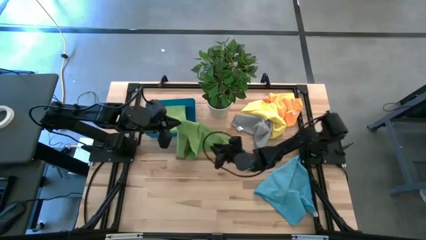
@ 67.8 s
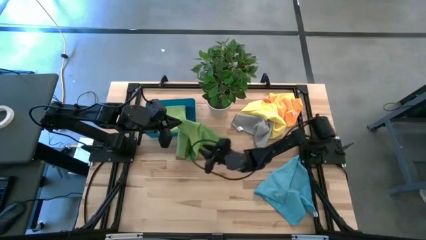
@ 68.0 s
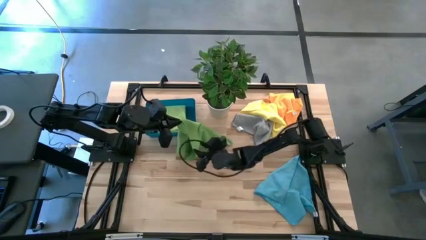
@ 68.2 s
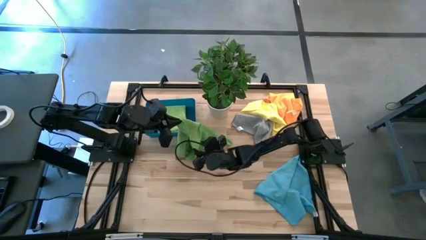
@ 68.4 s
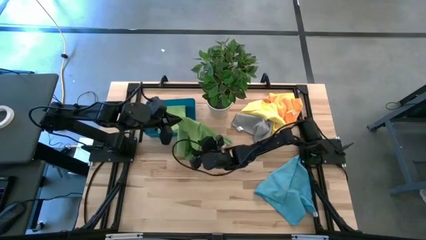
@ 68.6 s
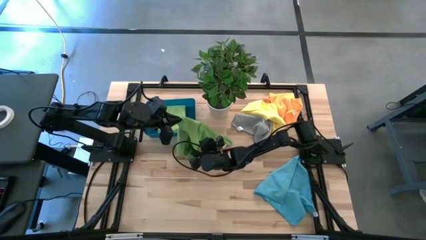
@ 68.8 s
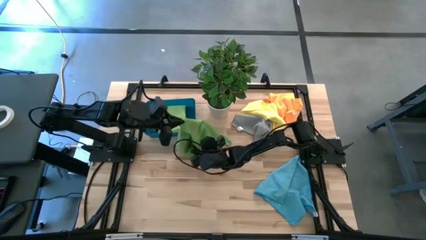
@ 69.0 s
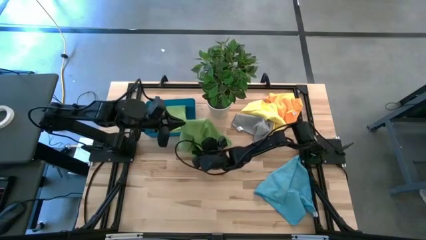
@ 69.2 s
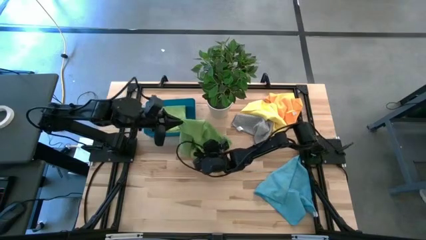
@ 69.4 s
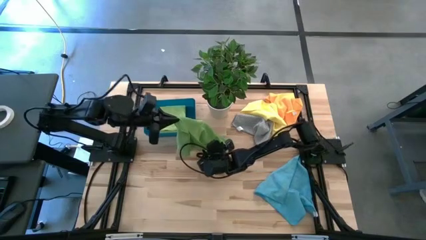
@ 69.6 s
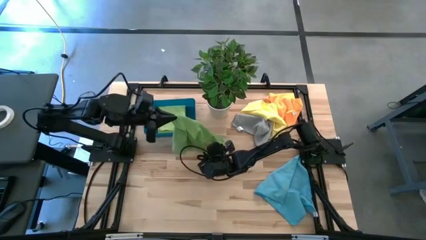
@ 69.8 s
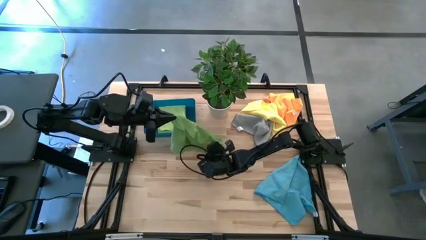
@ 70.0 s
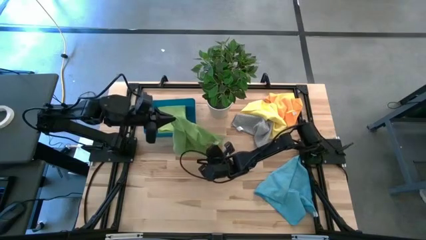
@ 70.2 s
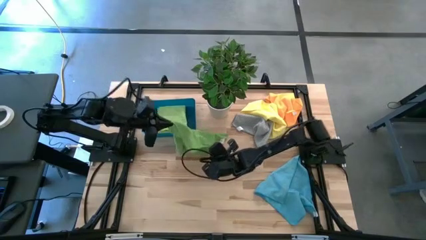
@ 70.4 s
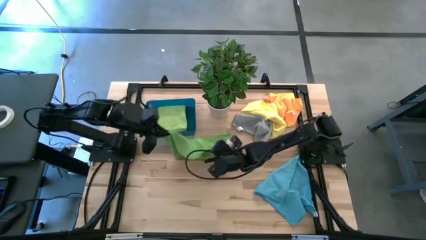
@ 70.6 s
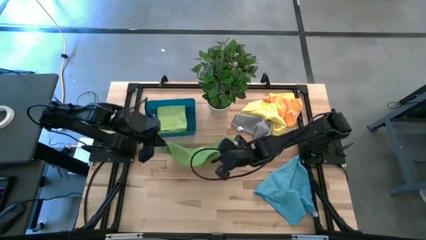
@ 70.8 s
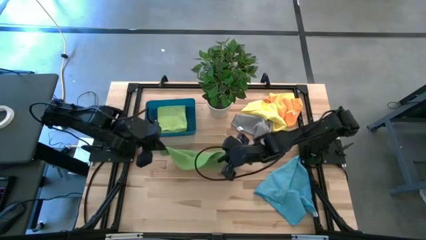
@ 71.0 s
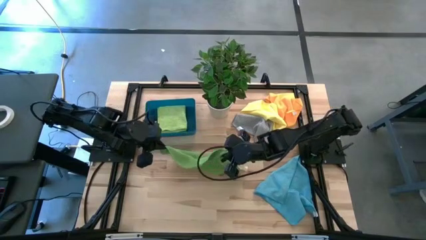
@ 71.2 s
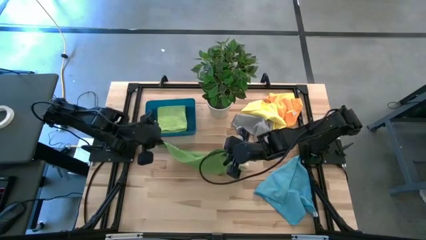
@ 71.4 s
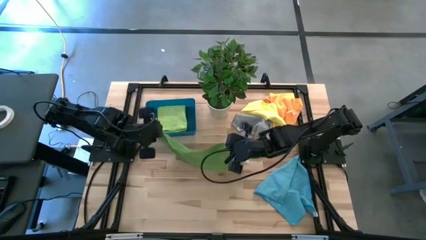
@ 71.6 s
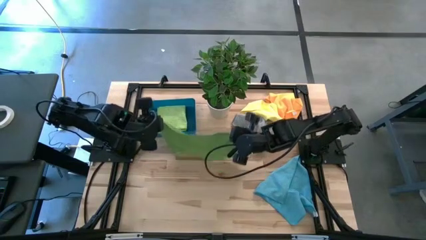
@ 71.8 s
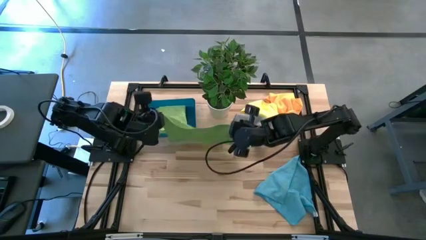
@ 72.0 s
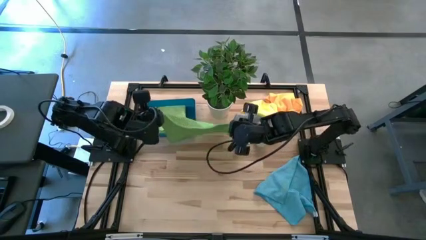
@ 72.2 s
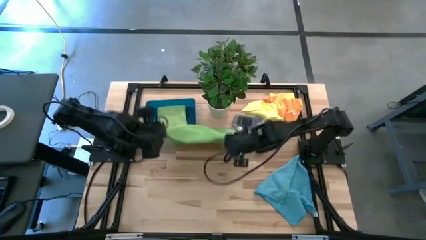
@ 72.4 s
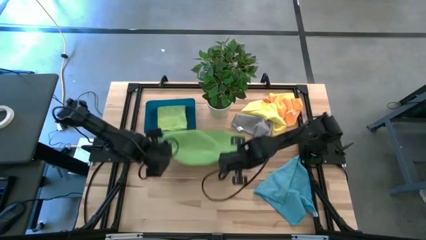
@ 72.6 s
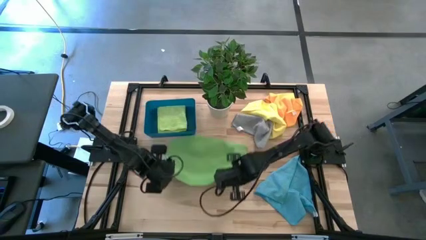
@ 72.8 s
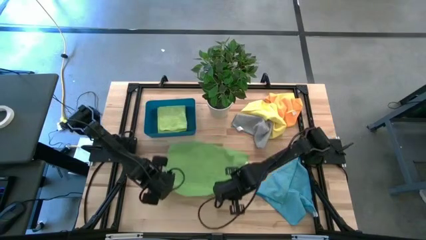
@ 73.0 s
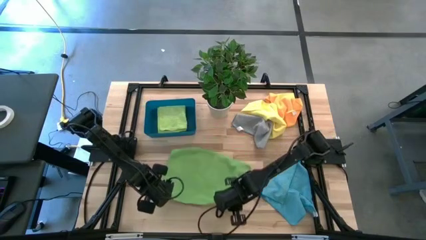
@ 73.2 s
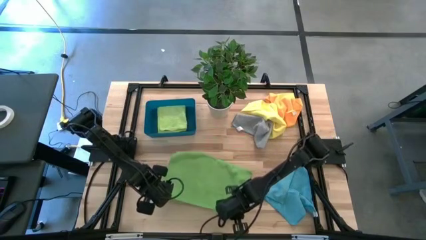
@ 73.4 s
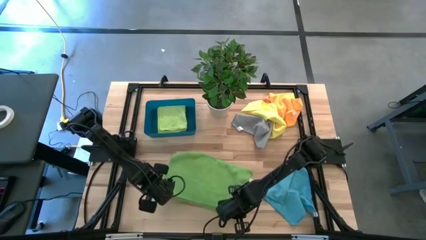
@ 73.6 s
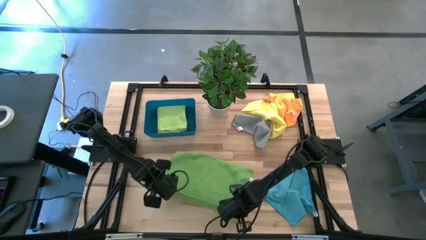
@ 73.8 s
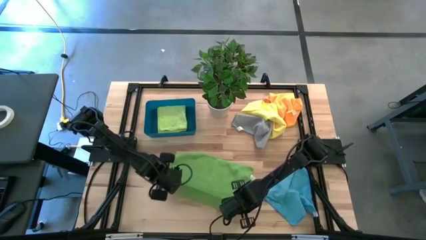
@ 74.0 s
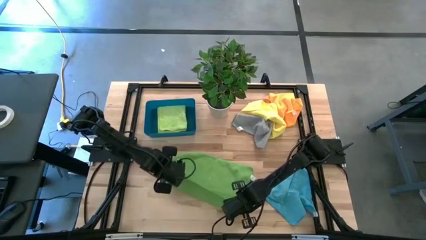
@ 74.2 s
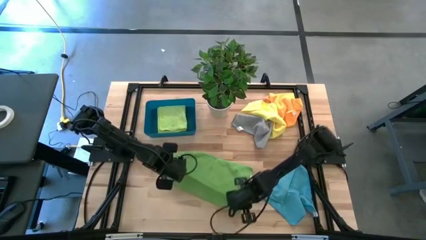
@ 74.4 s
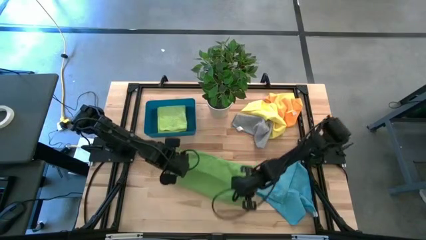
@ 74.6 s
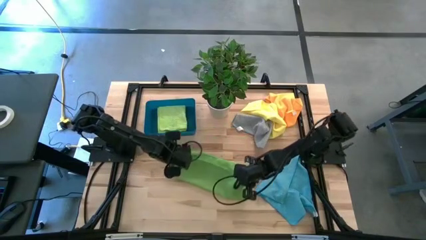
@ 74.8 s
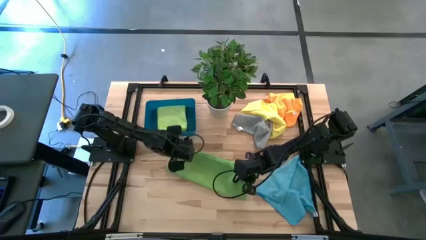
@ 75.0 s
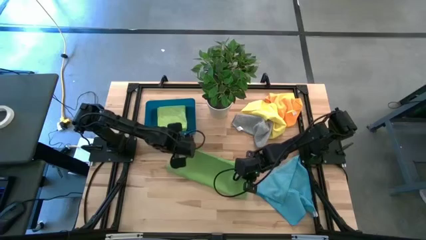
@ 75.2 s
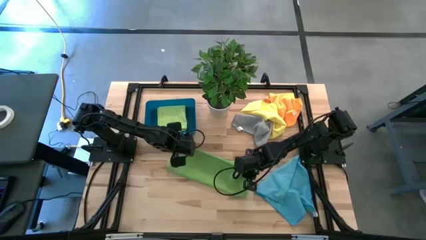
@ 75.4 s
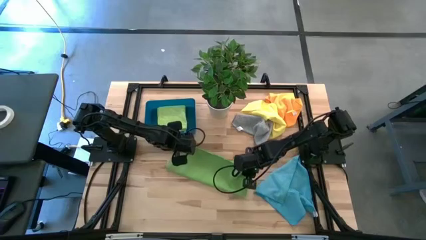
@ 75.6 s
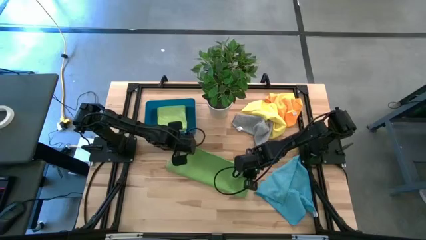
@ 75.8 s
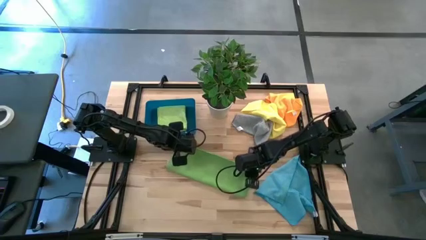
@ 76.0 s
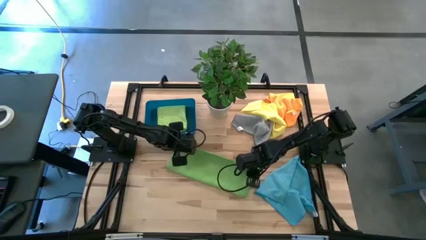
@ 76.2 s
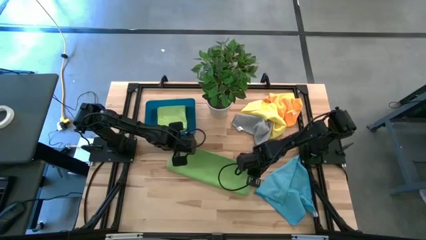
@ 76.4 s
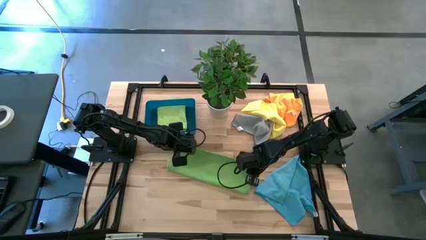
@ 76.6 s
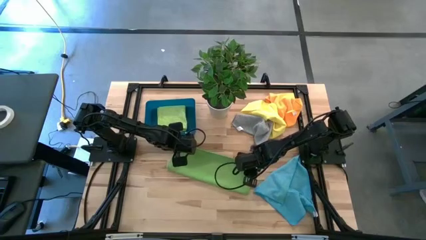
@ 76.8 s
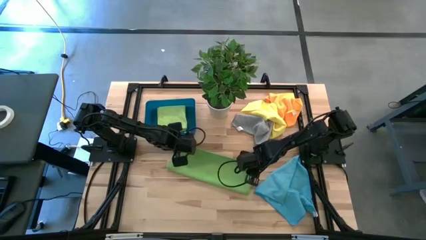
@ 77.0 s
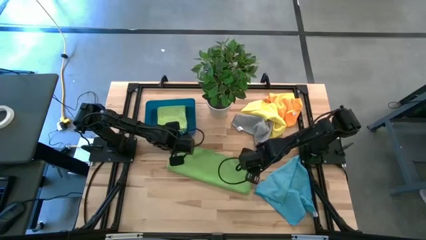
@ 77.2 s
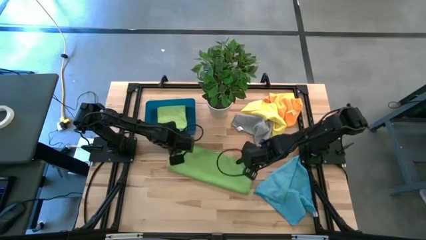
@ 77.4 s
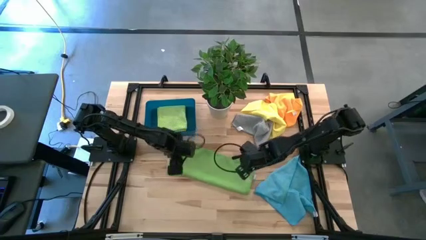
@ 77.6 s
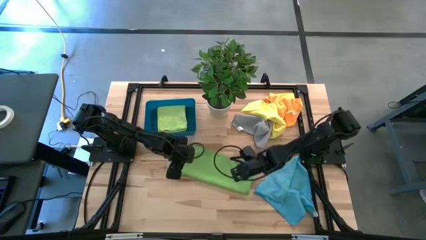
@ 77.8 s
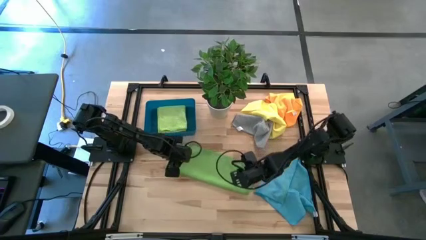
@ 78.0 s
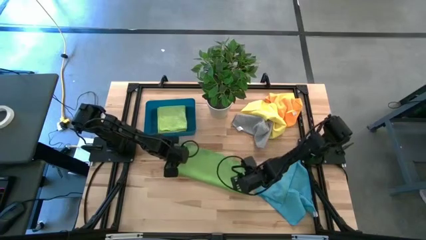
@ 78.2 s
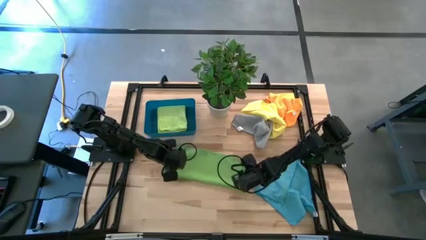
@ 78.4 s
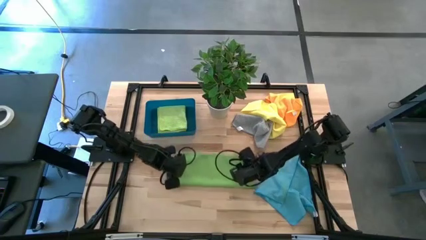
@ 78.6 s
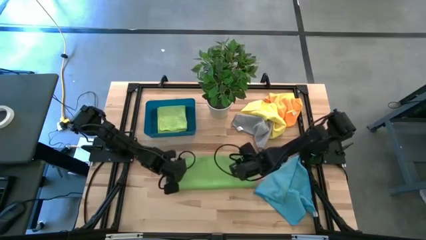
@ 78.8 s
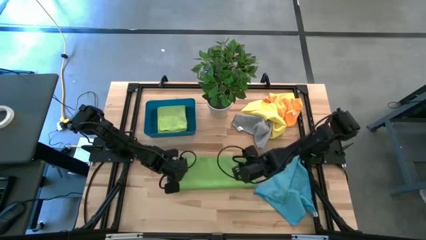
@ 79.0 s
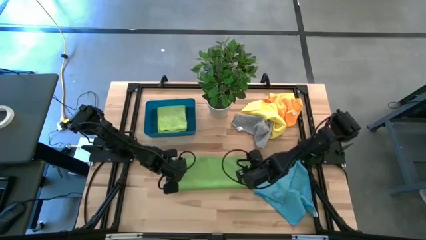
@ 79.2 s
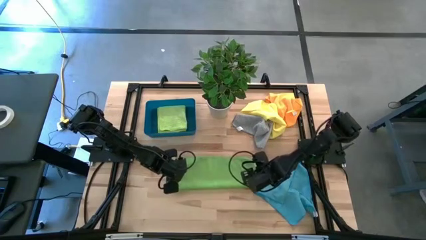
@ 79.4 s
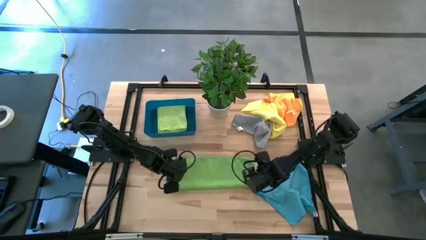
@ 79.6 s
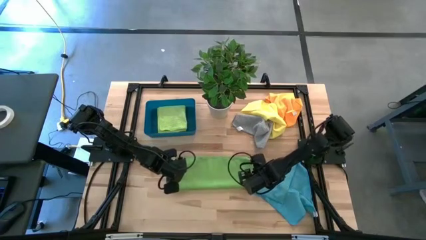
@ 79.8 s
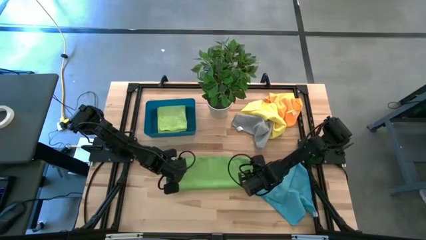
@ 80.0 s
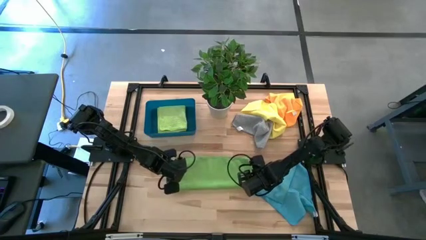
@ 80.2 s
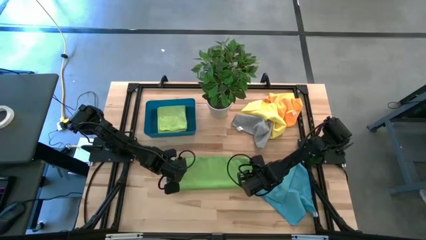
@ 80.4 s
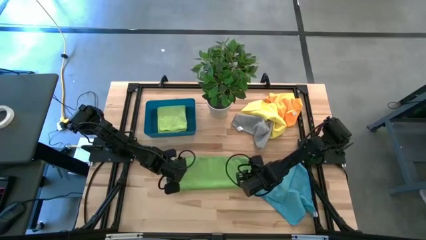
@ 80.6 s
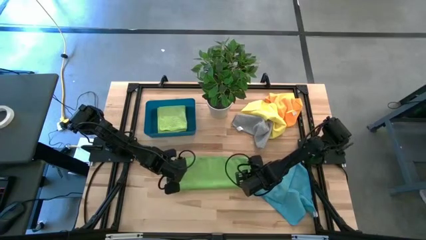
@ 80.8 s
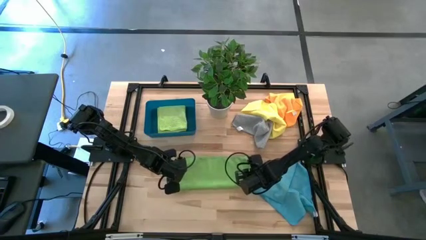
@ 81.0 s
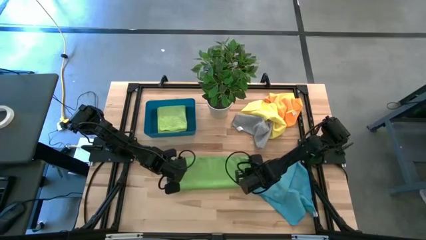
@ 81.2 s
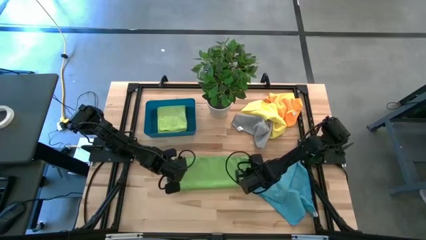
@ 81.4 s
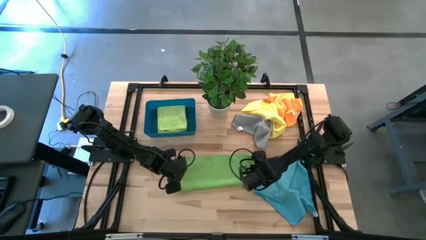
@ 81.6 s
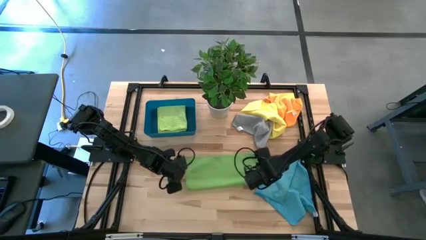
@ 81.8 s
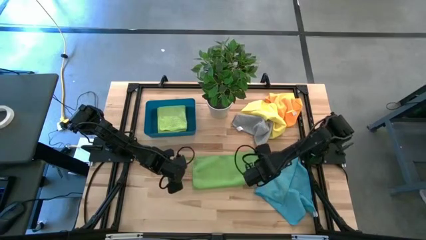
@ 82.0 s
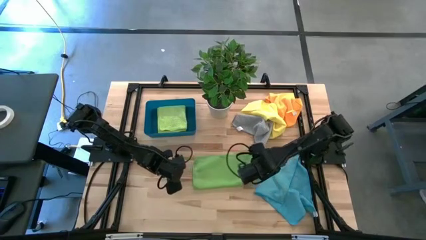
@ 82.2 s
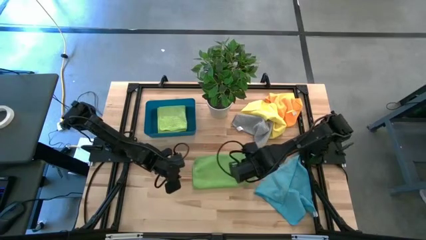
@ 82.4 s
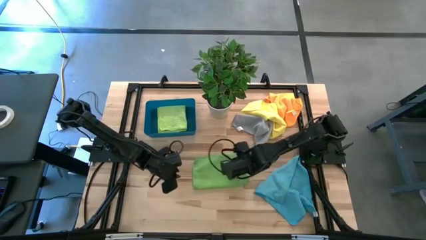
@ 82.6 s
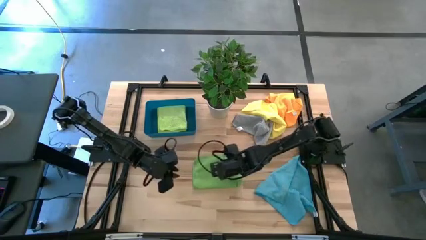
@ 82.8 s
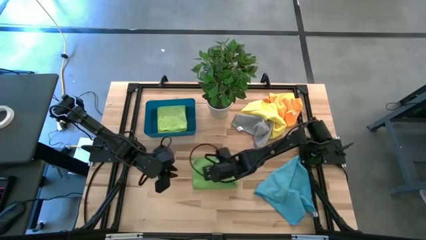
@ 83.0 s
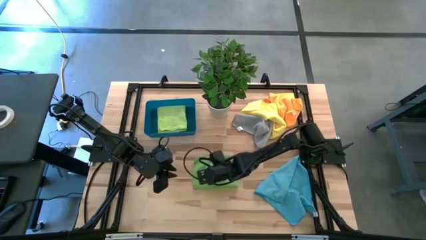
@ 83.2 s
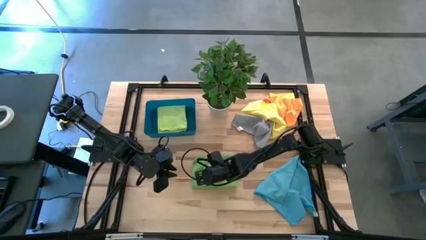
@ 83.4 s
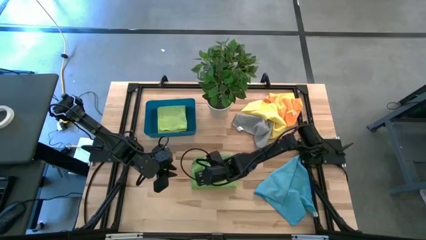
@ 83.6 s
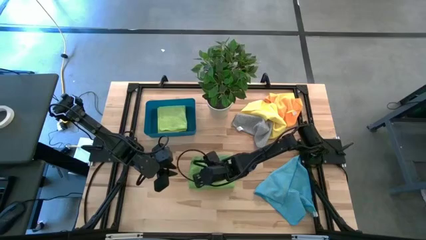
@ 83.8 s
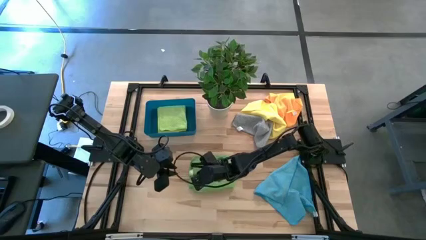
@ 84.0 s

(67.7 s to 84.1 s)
Task: Fold microfiber towels
Fold the green towel
